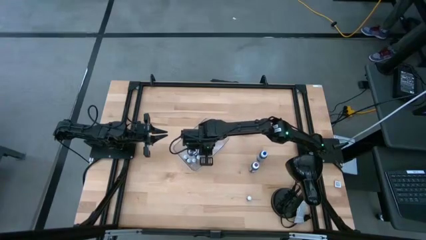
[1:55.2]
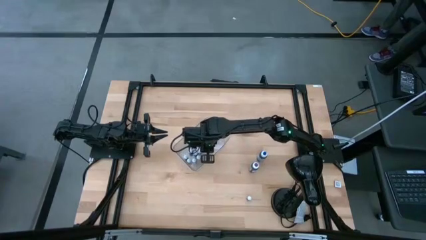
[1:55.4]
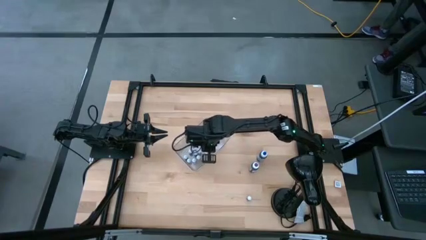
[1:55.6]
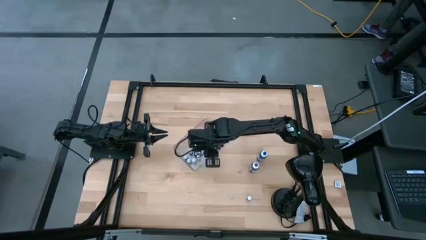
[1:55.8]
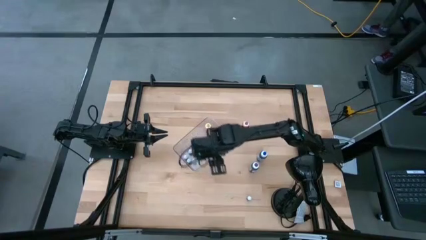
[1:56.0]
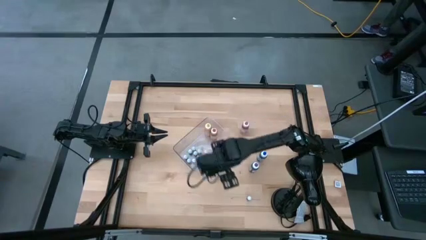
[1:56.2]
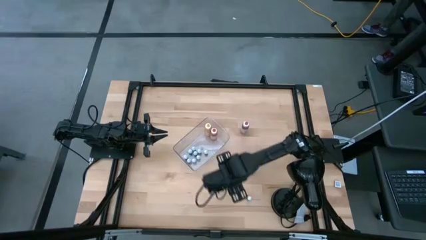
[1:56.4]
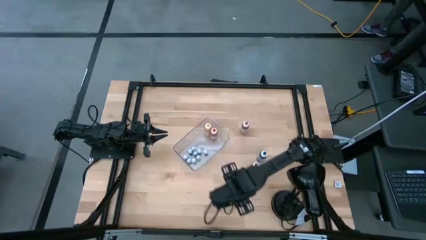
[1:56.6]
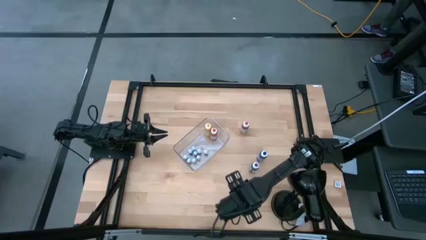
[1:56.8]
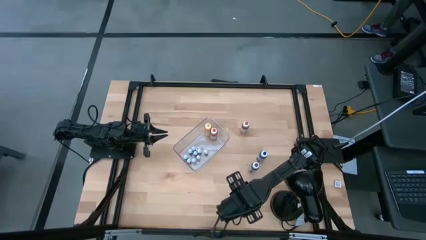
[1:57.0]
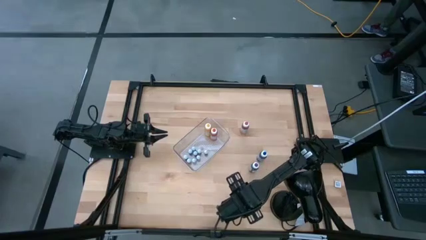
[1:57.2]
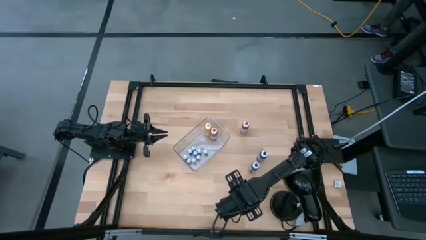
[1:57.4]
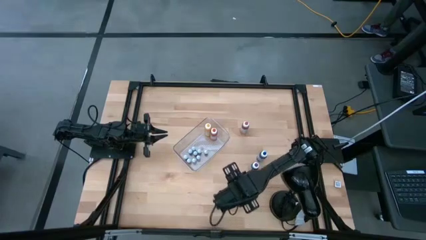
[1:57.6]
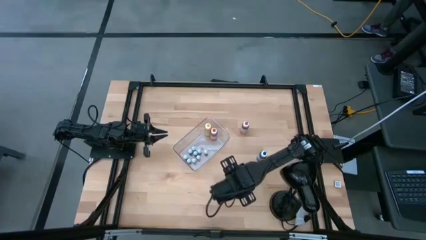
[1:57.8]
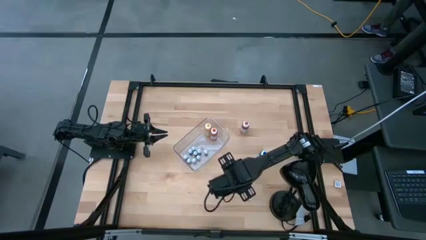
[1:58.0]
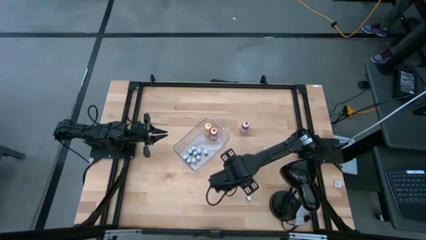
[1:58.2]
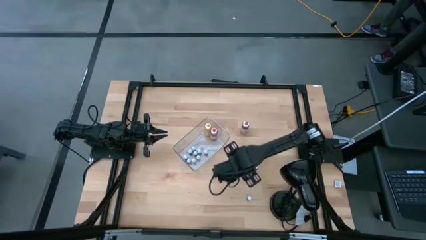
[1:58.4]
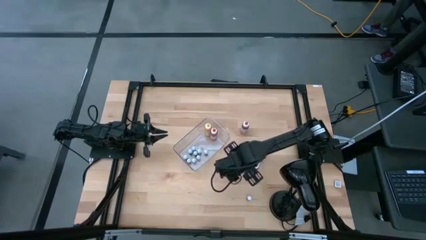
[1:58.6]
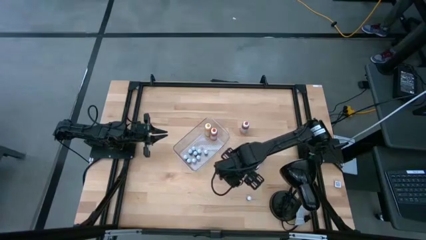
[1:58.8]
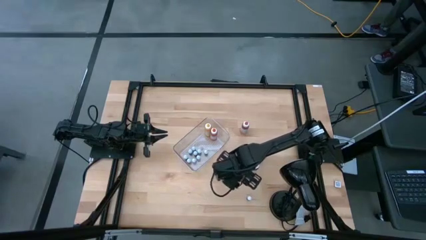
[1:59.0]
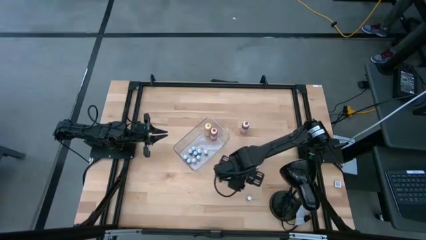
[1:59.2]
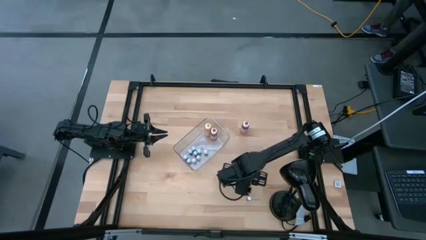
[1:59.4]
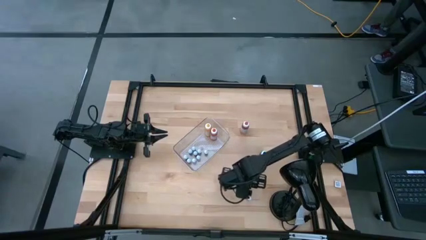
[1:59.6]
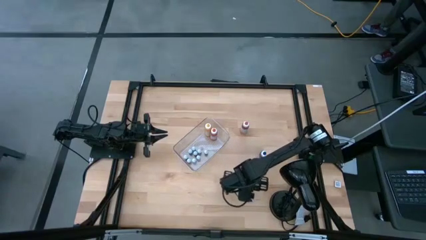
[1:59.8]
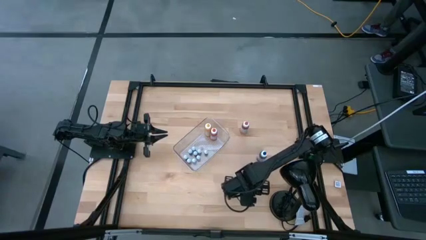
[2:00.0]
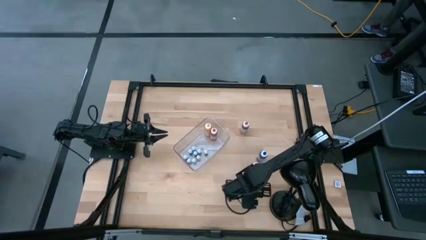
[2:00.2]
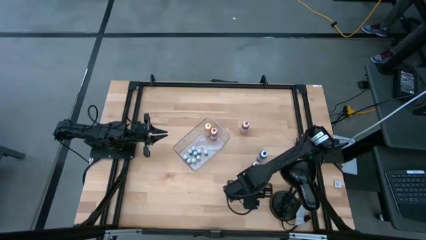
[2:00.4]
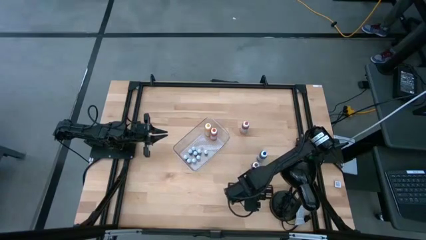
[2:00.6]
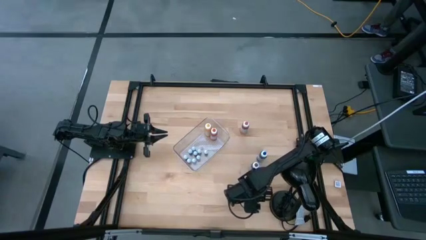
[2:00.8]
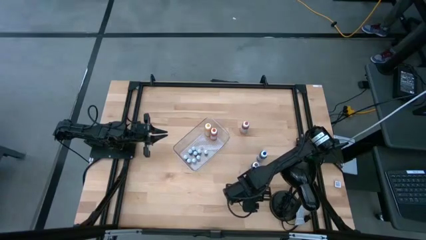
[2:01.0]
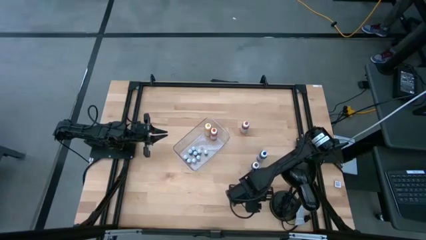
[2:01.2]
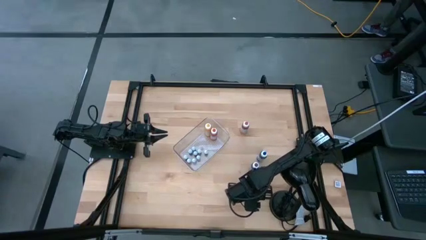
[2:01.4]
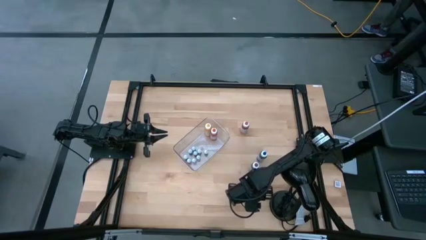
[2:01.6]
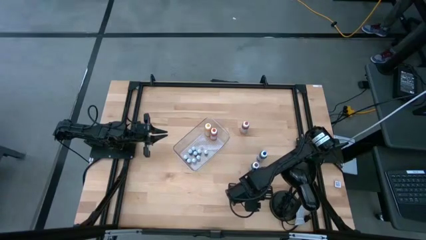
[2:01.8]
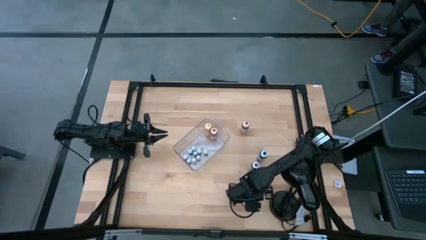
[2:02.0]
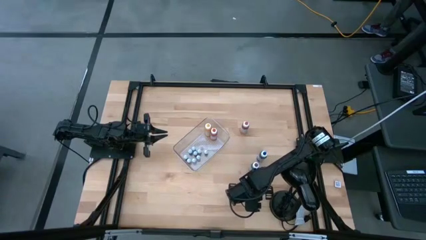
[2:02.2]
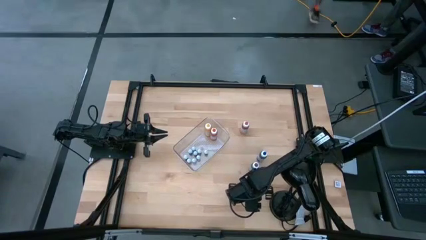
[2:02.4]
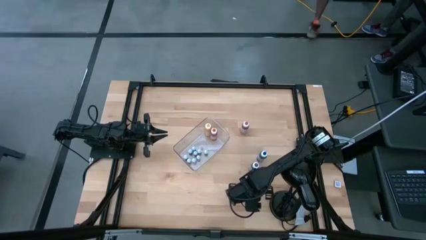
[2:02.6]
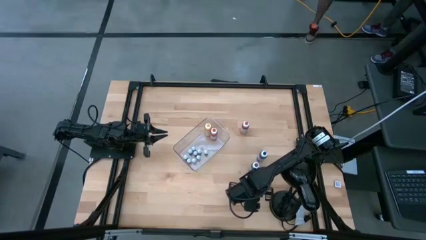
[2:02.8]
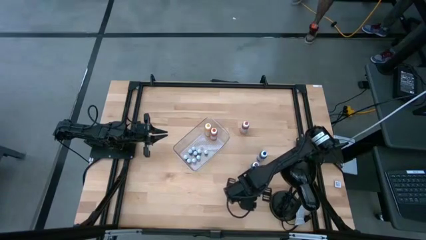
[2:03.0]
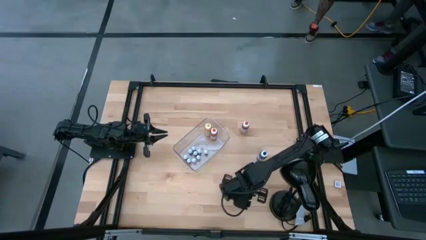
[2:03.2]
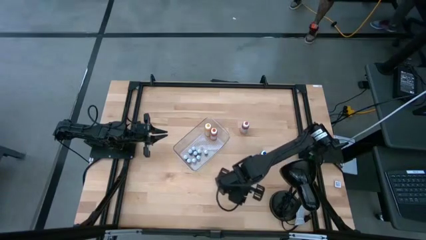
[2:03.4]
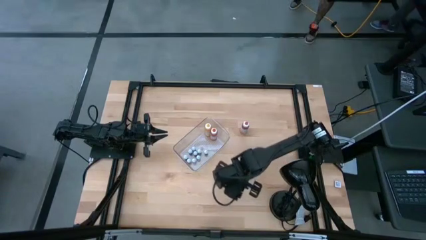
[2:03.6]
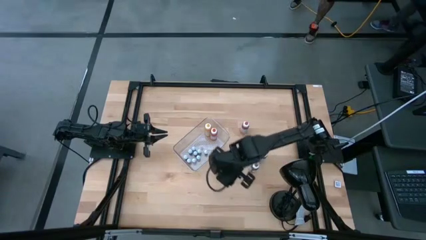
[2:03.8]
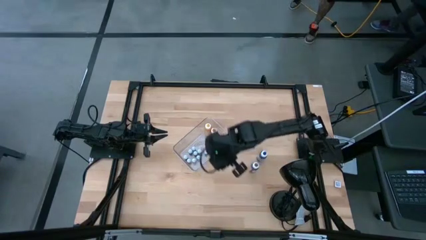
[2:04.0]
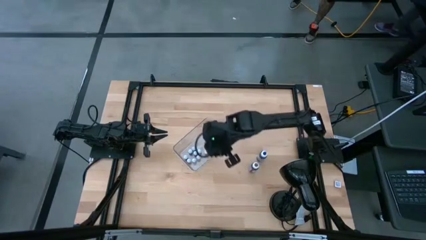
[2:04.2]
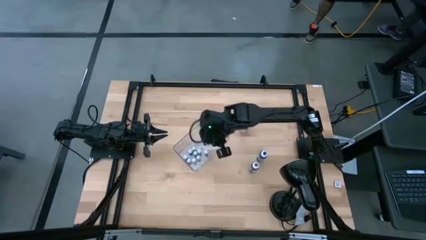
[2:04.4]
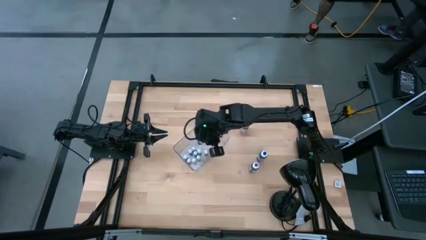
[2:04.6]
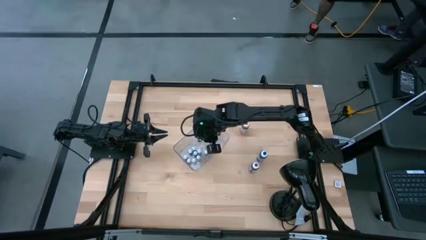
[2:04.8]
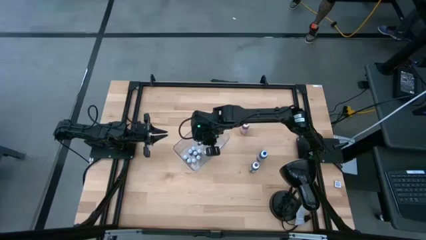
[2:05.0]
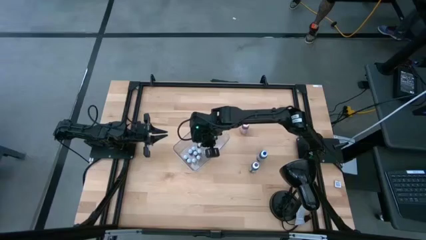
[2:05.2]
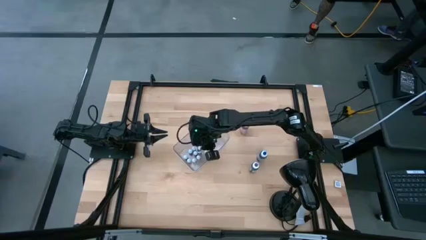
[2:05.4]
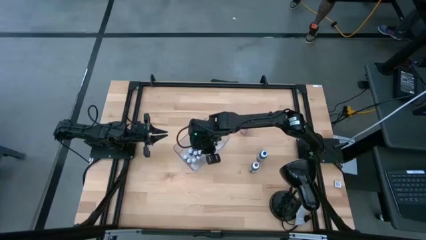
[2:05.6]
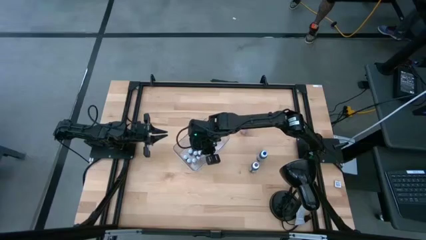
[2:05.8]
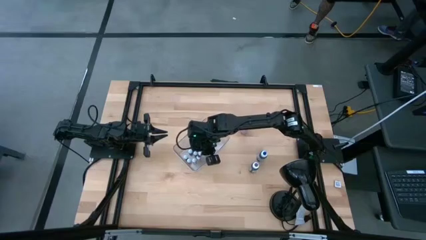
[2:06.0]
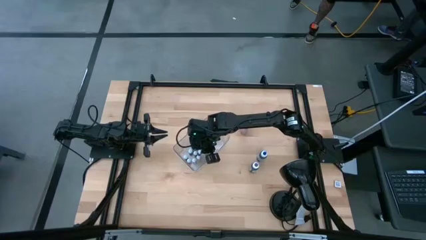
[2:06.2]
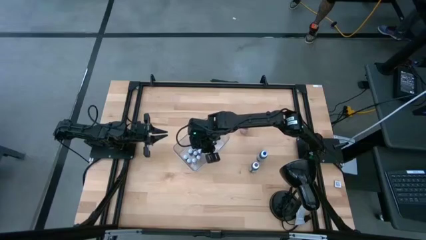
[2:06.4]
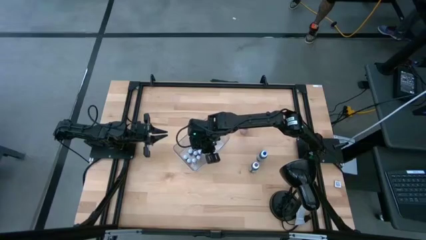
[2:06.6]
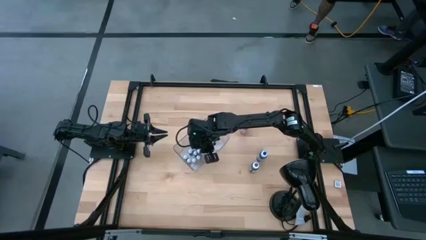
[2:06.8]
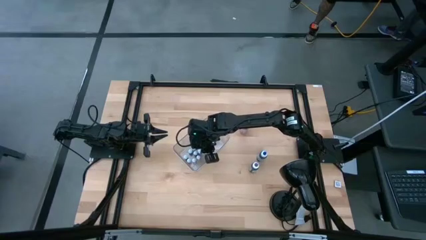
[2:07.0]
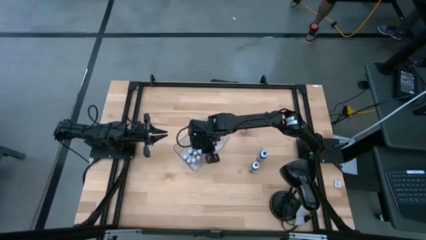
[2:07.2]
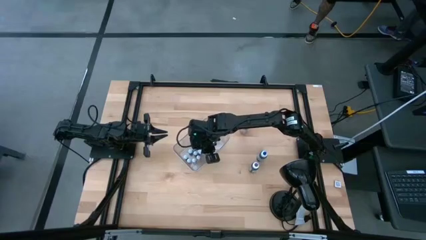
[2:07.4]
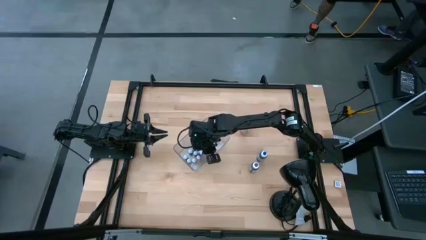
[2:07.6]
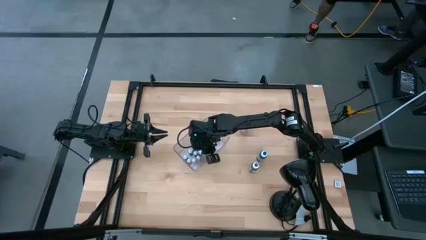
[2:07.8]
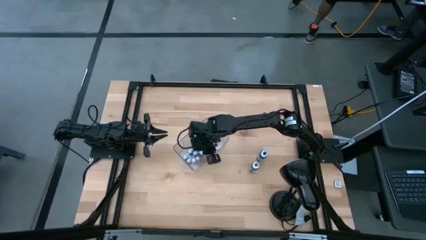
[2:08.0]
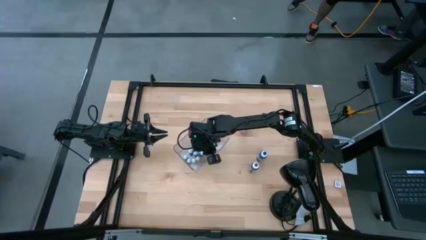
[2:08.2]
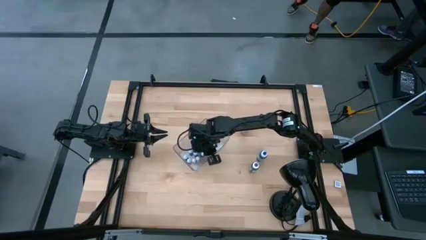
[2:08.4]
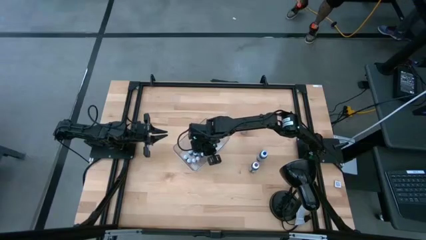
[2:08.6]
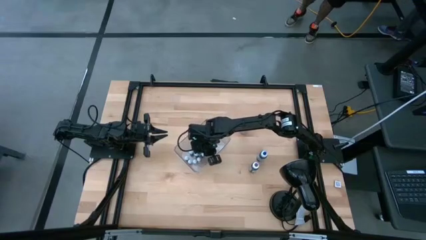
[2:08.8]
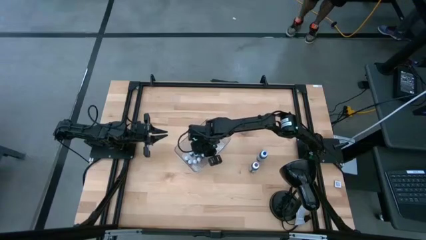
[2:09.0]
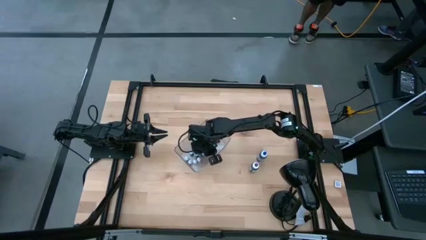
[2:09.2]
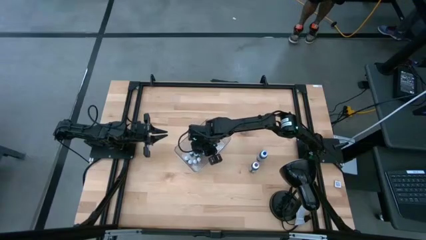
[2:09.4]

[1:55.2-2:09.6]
Task: Pick & Place food coloring
Put the small black food coloring bottle into the transparent bin

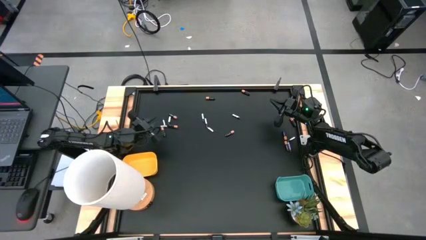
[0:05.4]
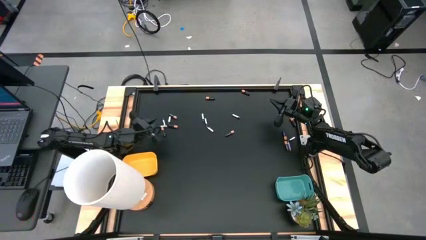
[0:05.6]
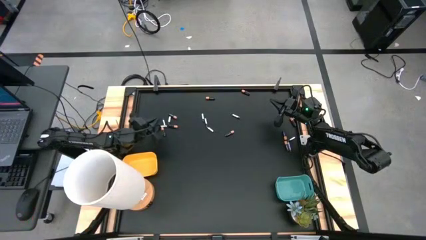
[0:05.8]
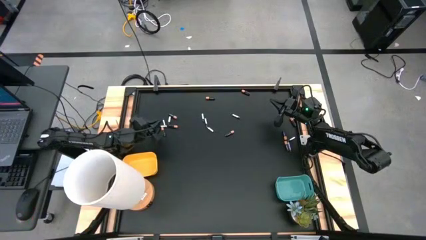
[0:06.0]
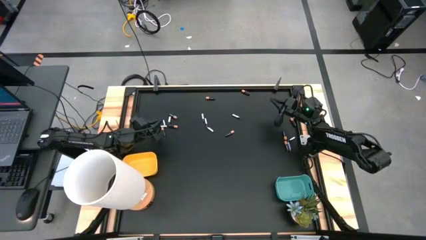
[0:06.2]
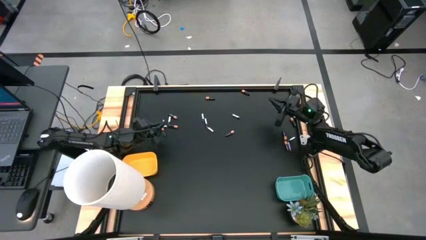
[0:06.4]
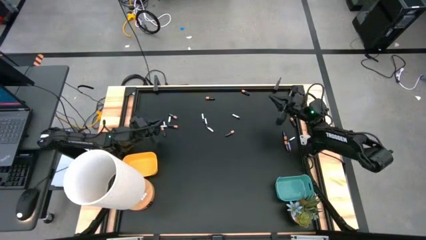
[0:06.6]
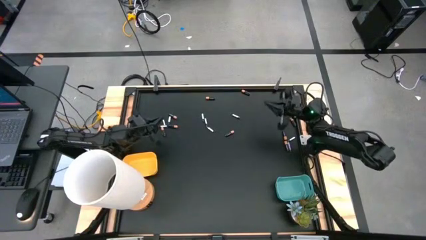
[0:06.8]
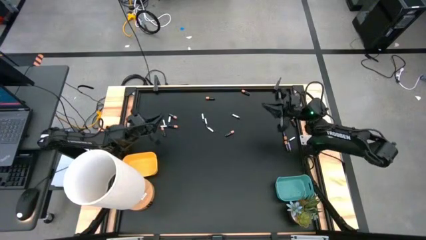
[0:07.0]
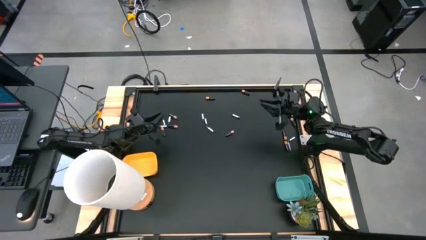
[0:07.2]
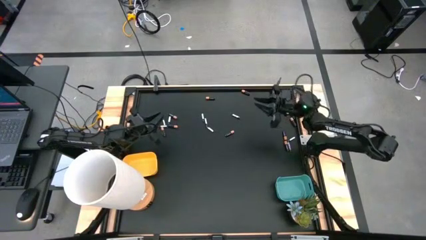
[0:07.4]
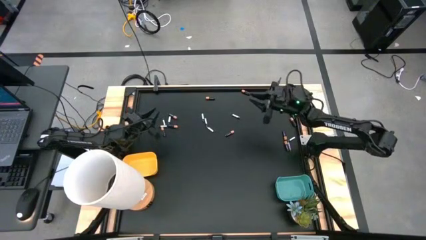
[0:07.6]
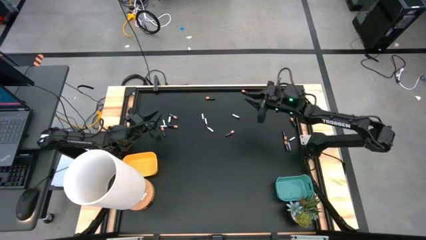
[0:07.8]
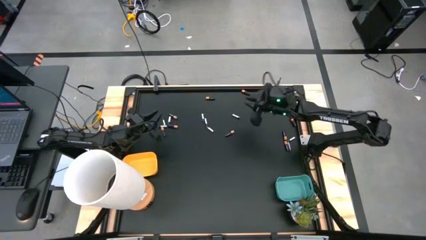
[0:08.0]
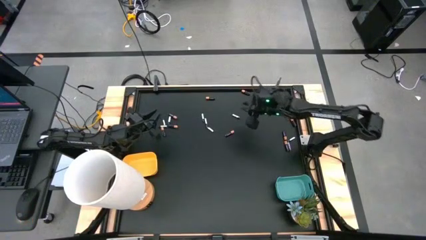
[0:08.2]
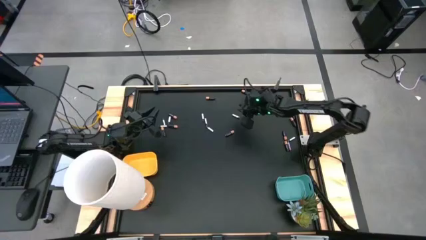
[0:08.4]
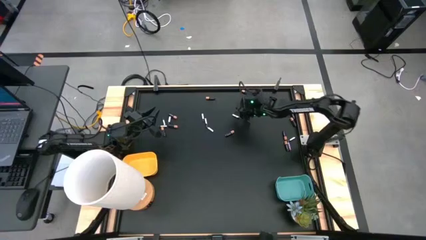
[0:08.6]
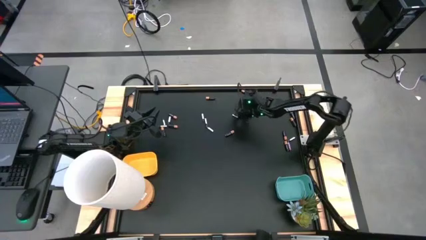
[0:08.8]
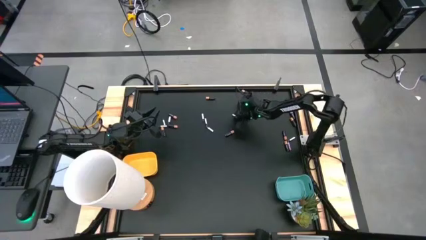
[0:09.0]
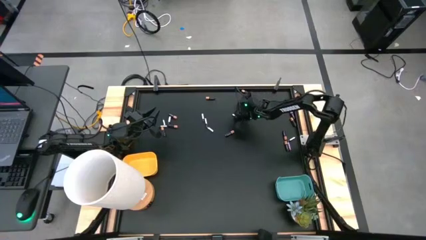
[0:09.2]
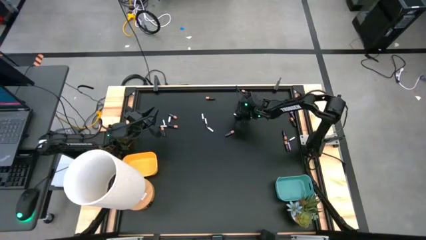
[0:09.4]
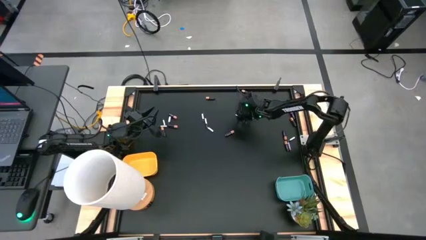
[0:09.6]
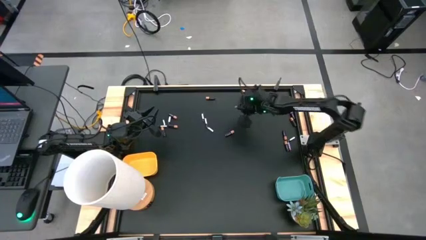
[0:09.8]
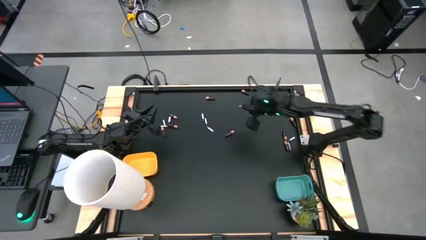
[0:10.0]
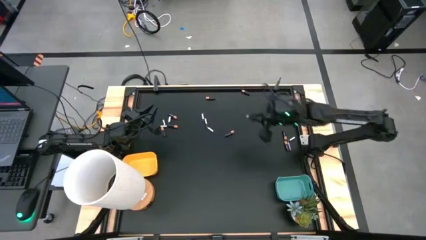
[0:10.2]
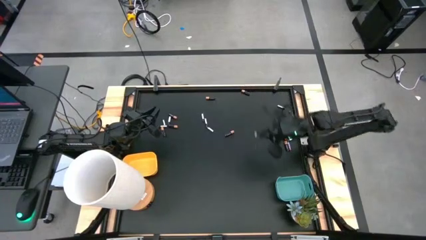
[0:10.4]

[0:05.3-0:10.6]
Task: Sort batteries
Put the silver battery into the green bin
